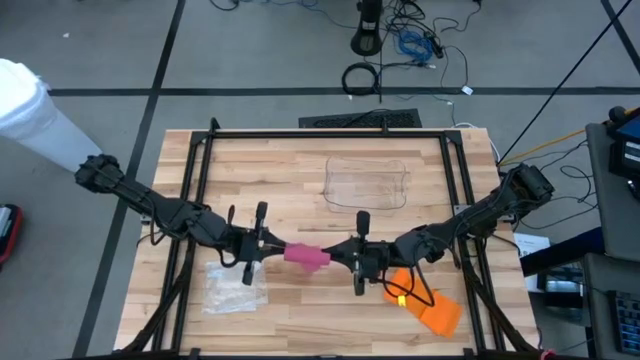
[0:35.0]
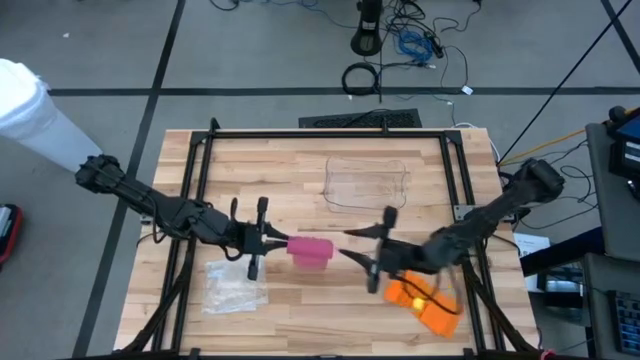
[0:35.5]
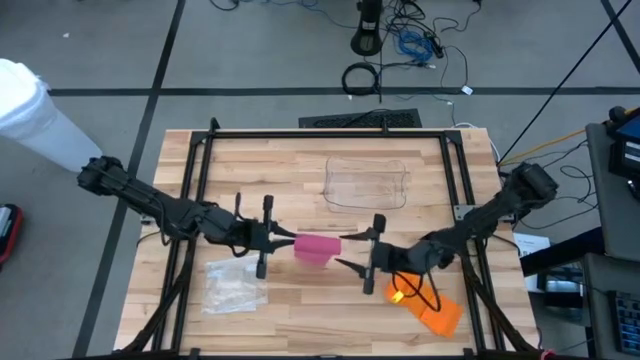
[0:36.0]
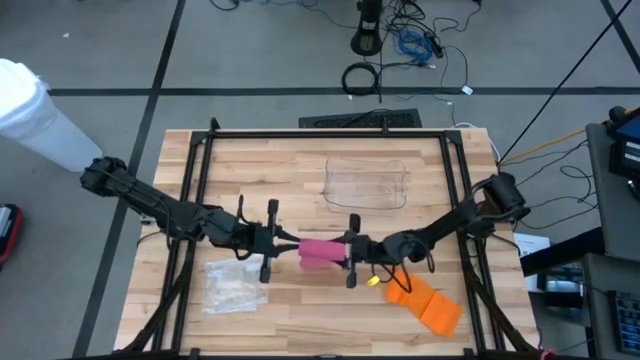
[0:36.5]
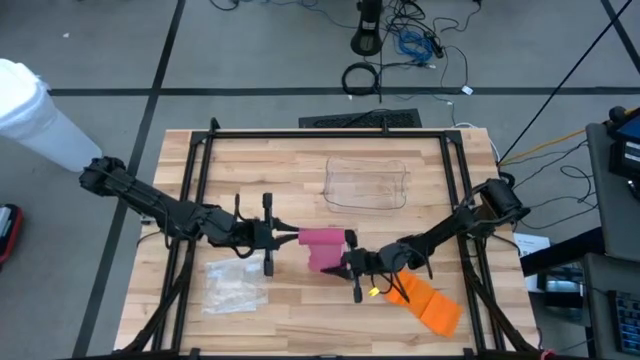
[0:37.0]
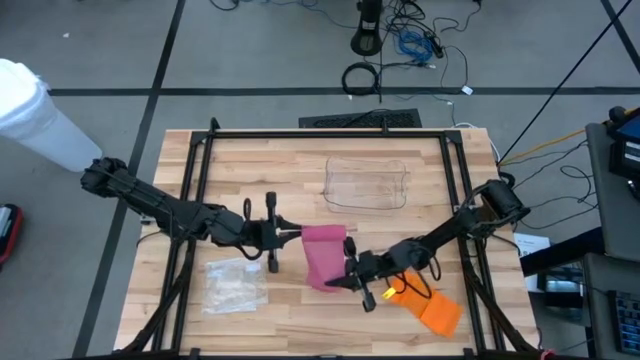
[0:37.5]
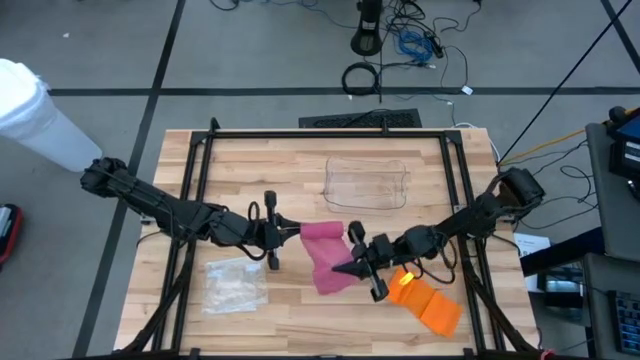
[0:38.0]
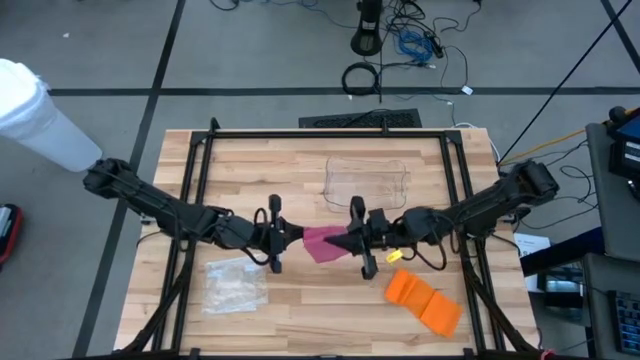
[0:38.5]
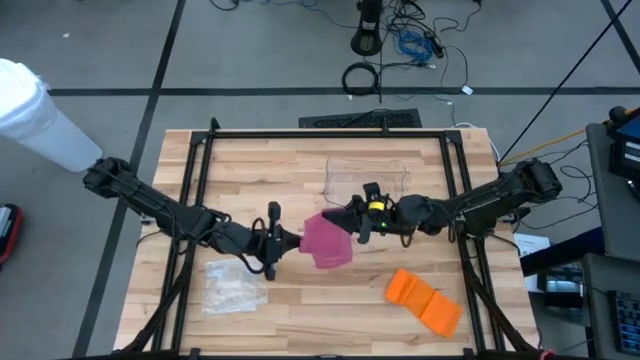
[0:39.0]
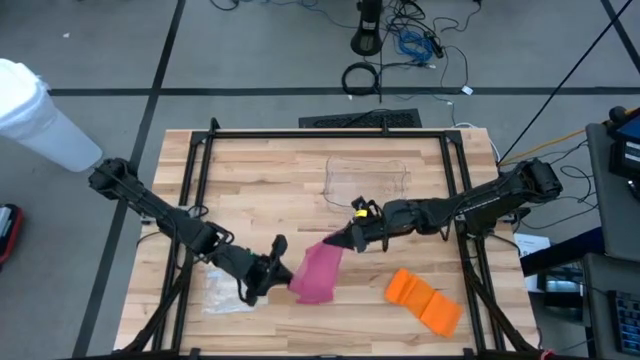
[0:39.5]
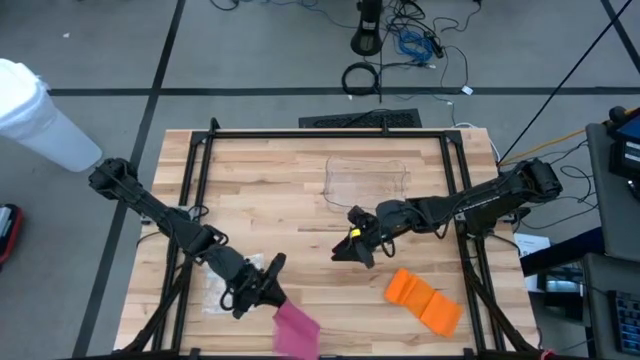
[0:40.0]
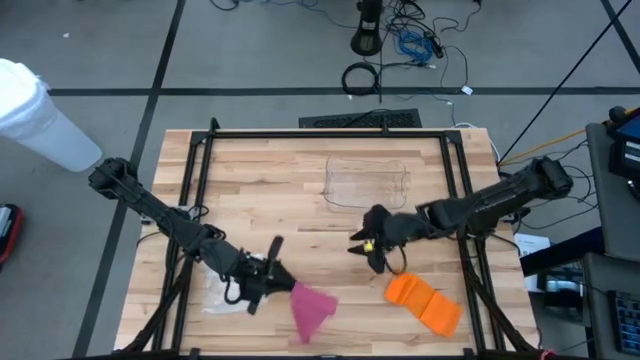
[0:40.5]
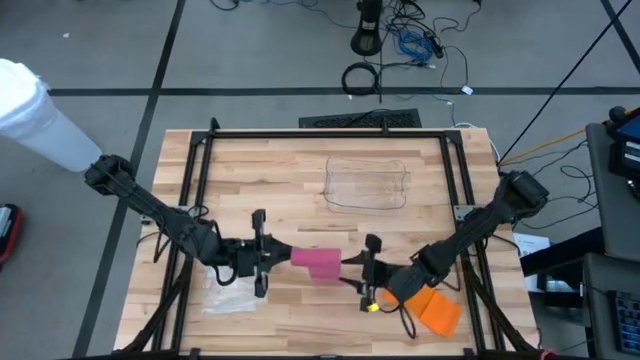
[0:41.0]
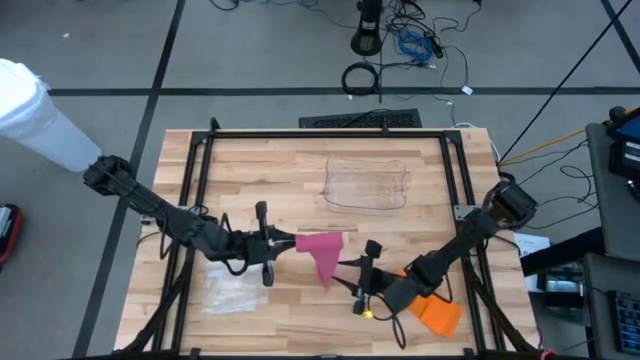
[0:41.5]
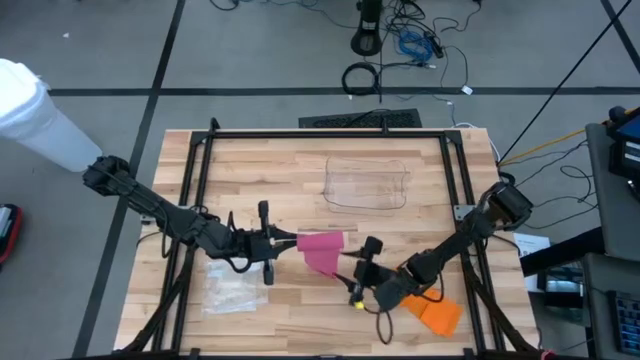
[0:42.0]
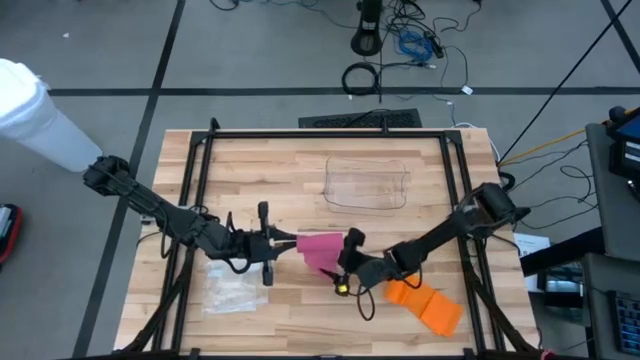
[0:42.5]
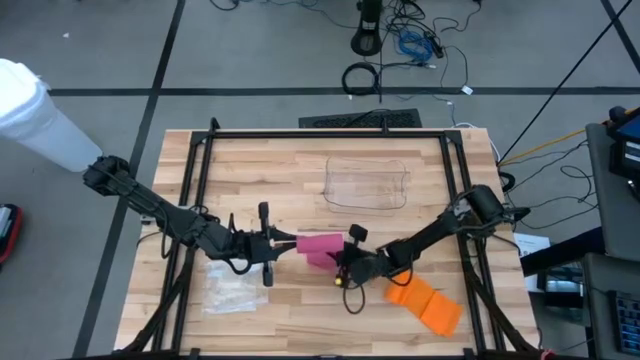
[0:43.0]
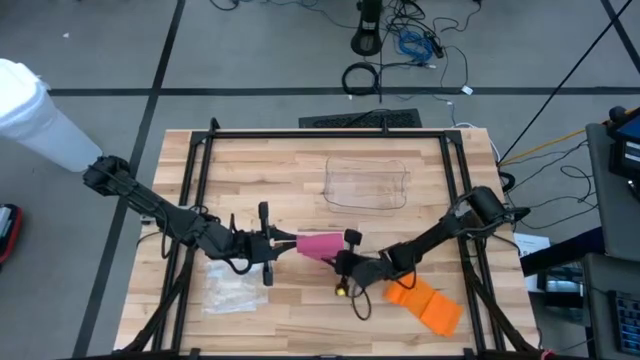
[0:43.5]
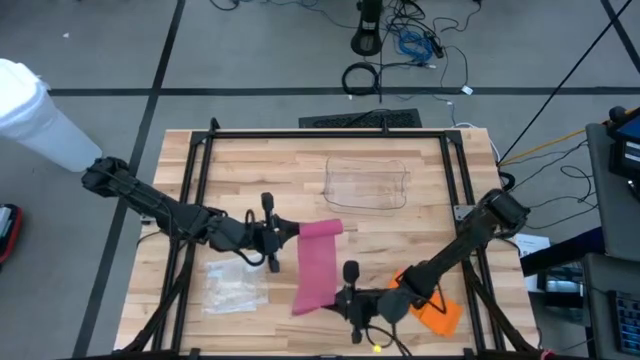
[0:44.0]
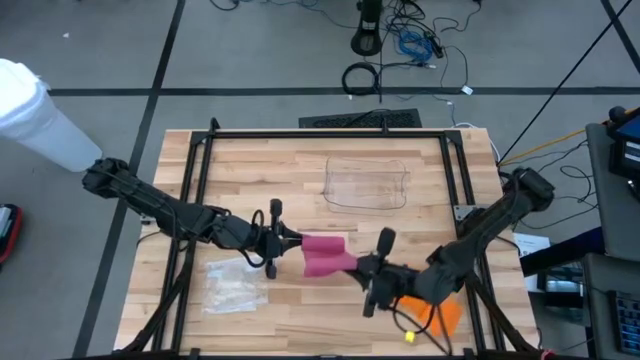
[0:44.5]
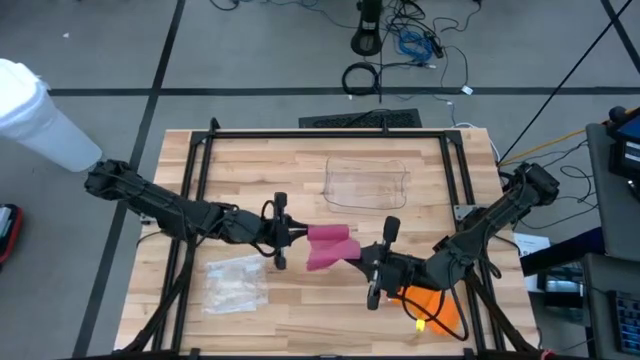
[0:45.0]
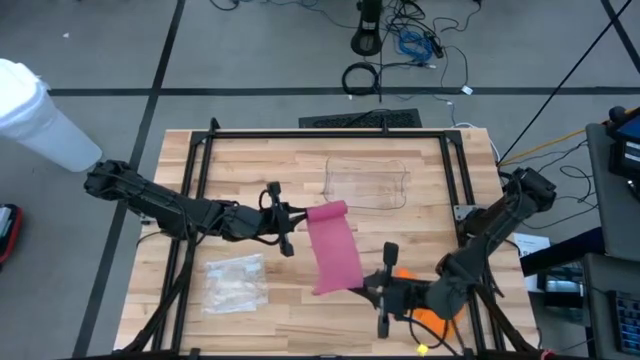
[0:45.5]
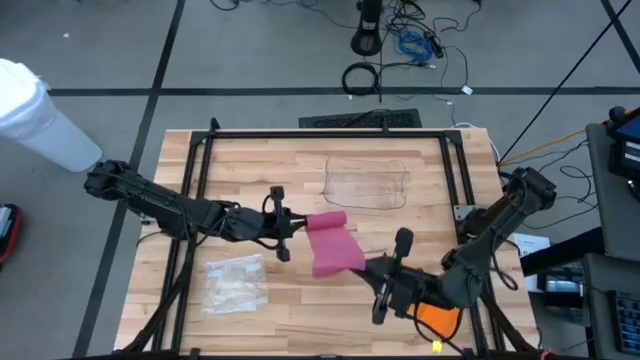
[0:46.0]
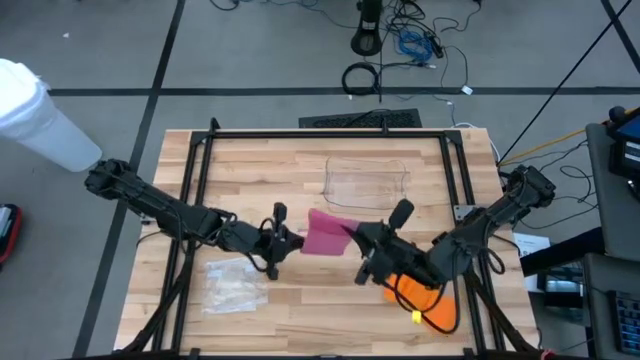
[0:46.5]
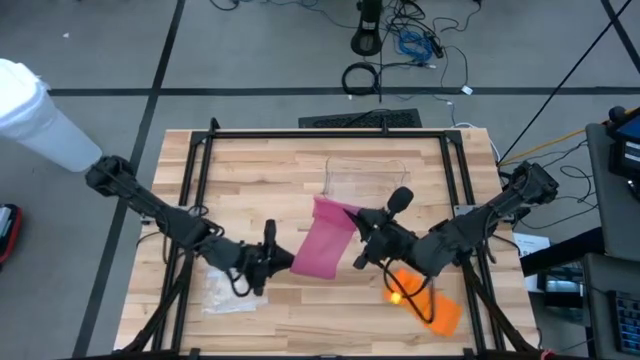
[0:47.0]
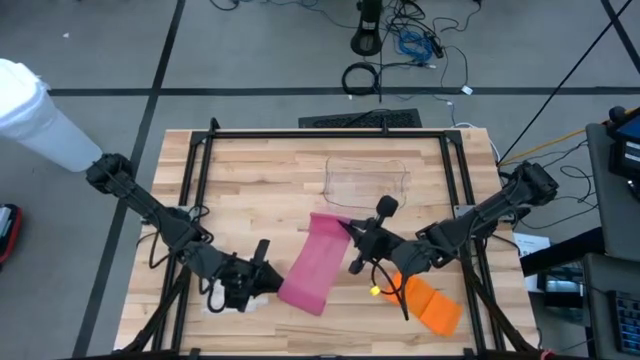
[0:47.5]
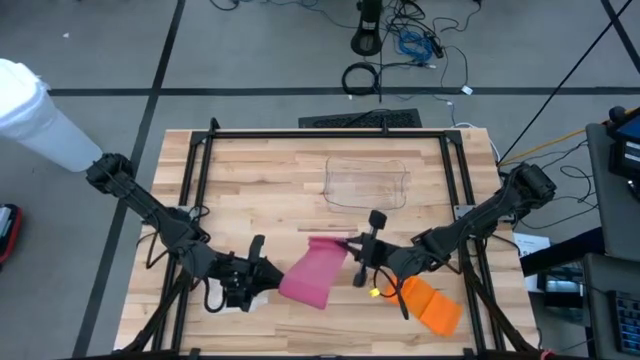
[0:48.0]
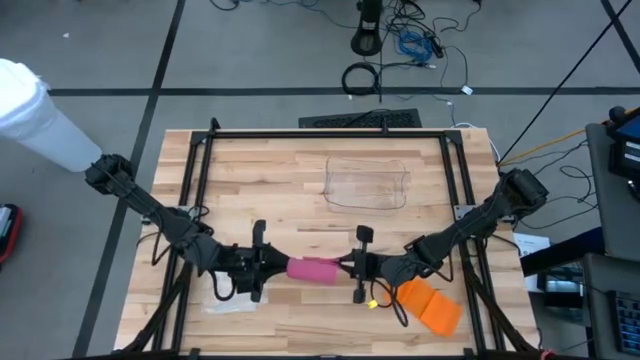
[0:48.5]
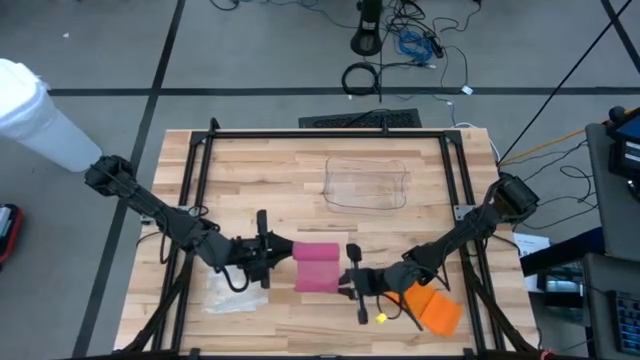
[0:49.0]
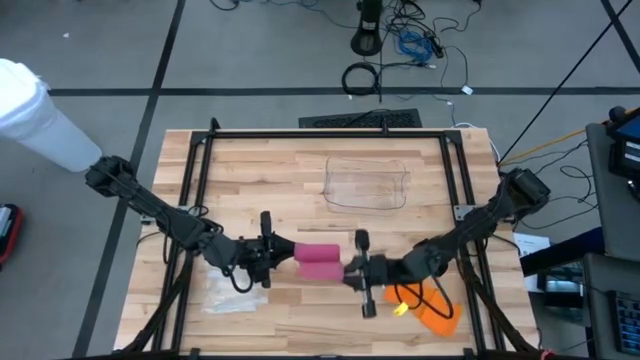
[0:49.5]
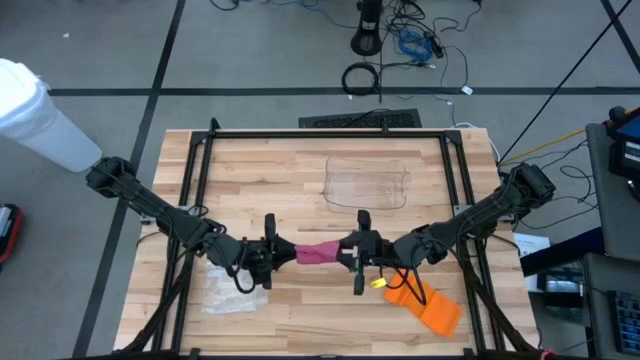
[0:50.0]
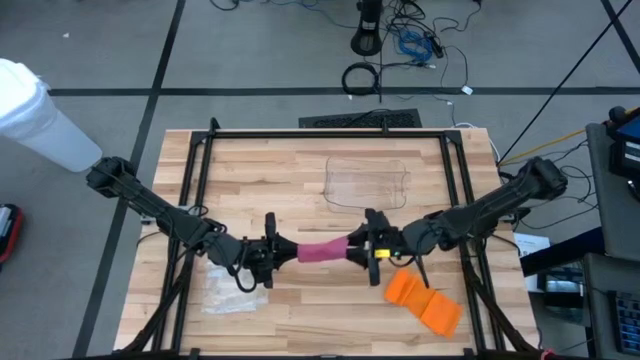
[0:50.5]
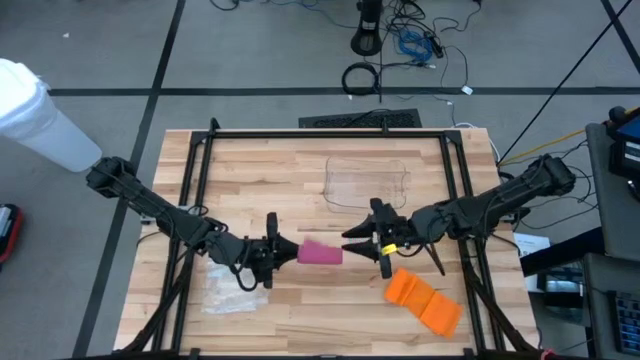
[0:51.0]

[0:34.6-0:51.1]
Task: Roll bandage
Roll the pink bandage

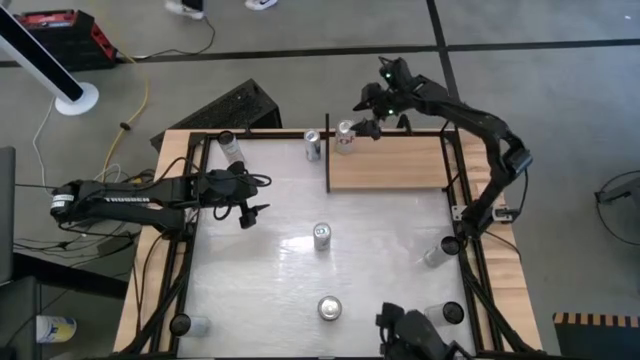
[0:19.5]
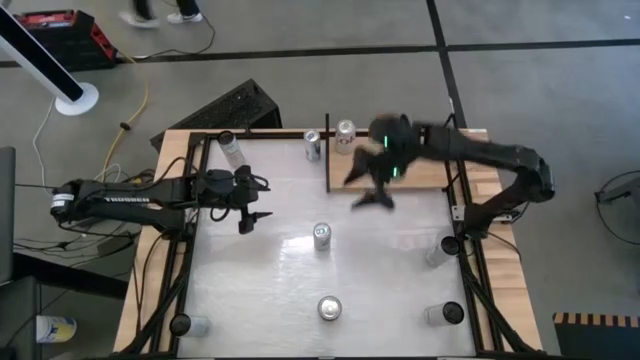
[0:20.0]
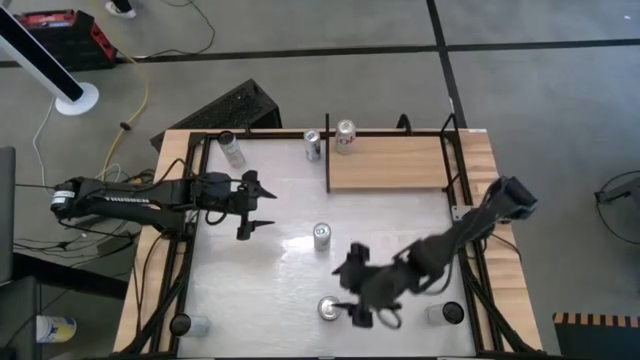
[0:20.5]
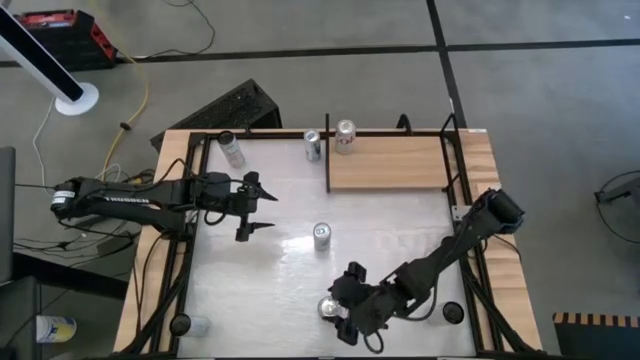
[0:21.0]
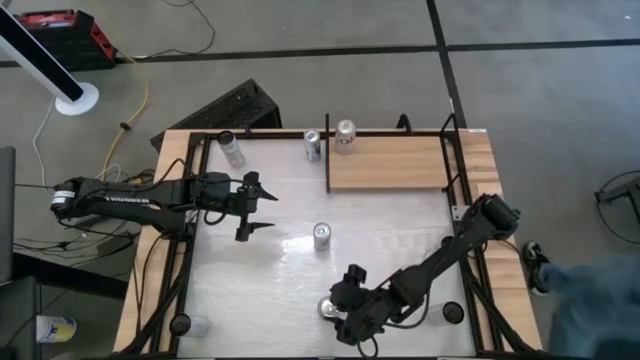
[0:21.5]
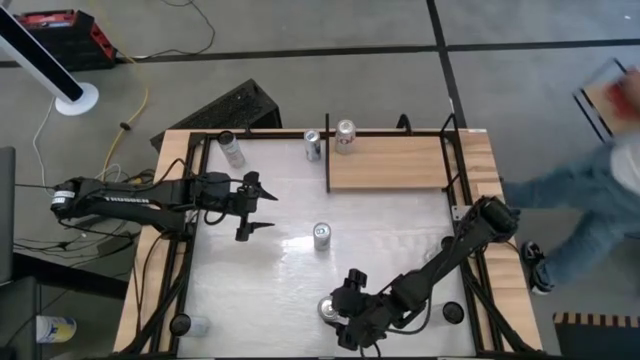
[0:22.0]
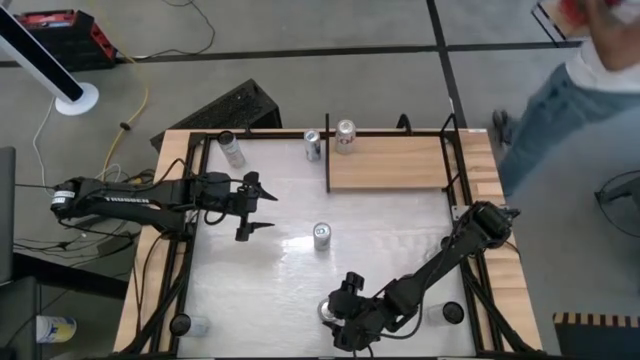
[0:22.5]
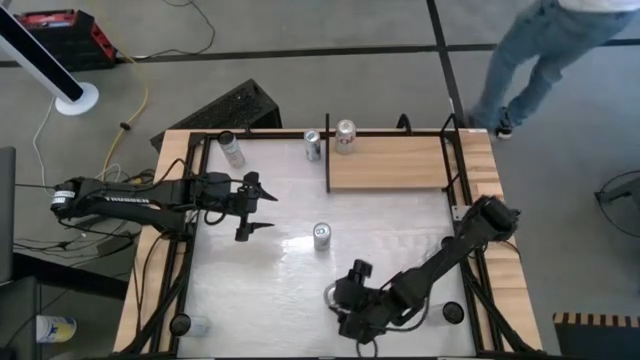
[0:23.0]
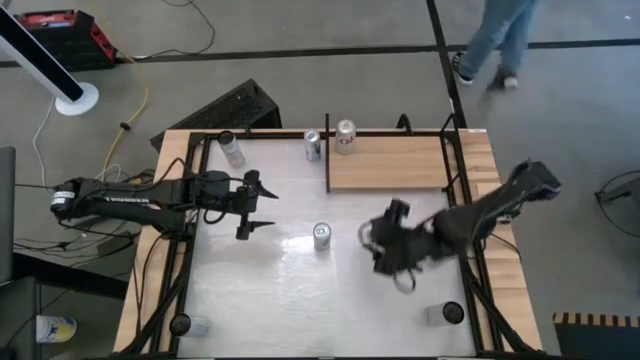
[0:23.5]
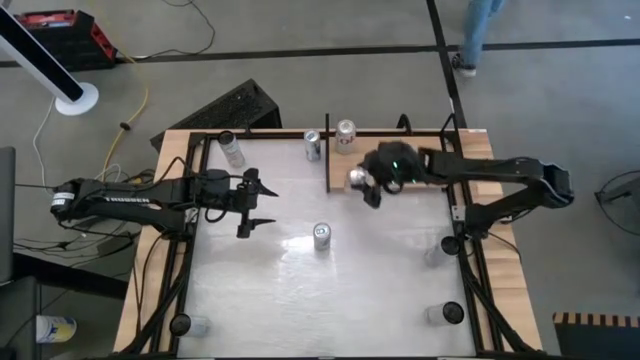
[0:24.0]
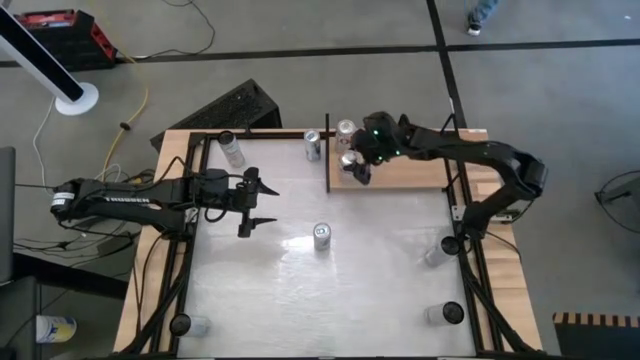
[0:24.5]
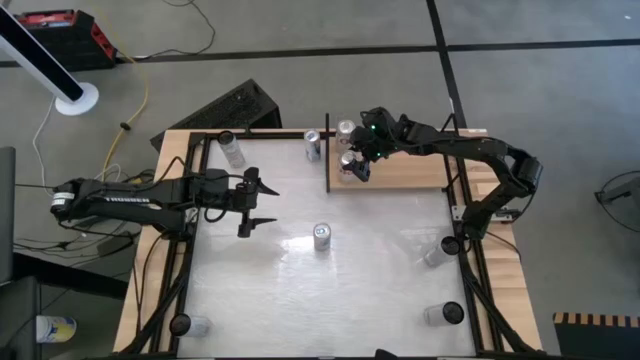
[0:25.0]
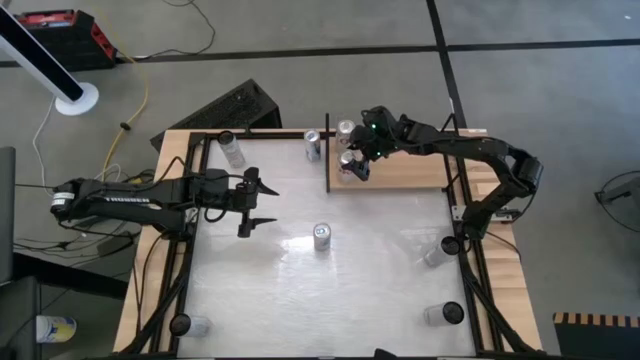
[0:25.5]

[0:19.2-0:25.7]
Task: Place canned beverage on shelf
Put the red-silver soda can aligned with the other red-silver soda can on the shelf
